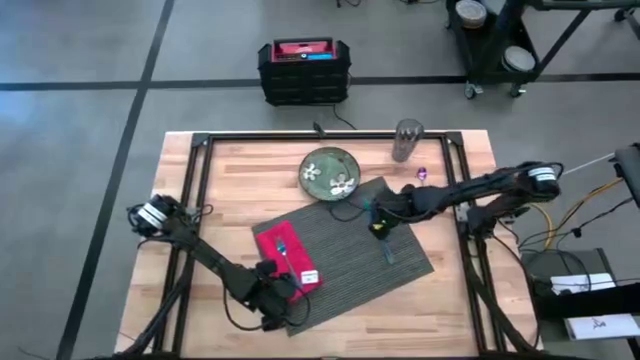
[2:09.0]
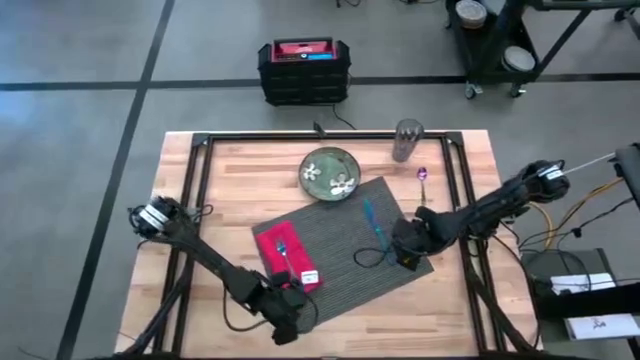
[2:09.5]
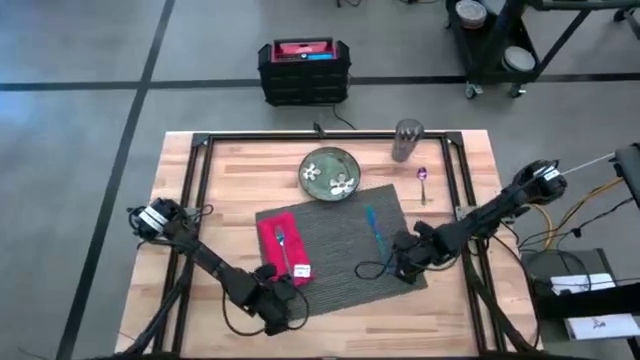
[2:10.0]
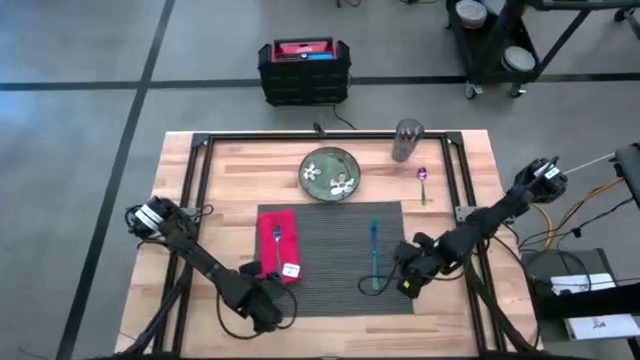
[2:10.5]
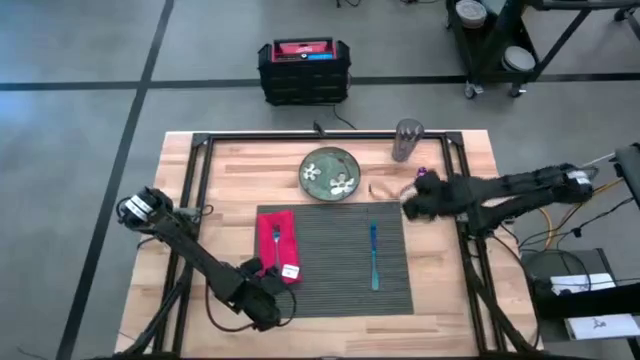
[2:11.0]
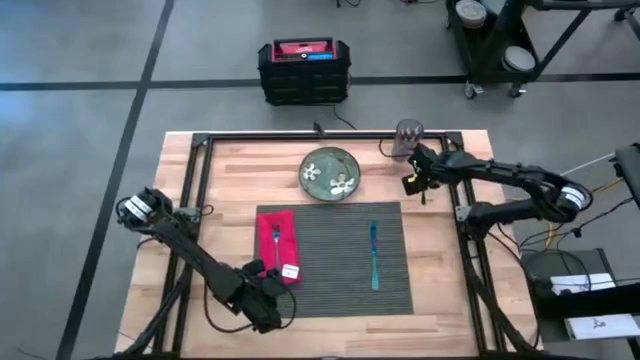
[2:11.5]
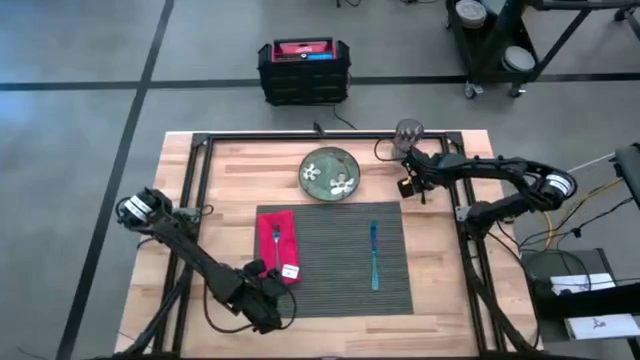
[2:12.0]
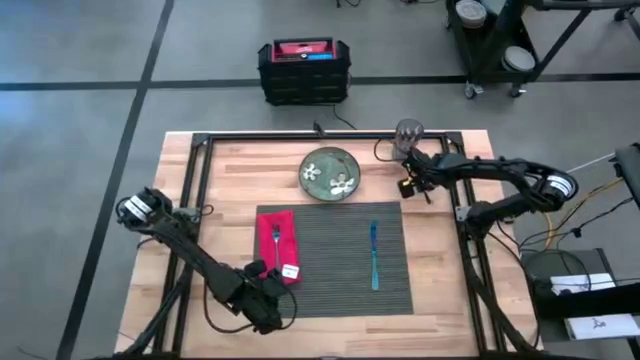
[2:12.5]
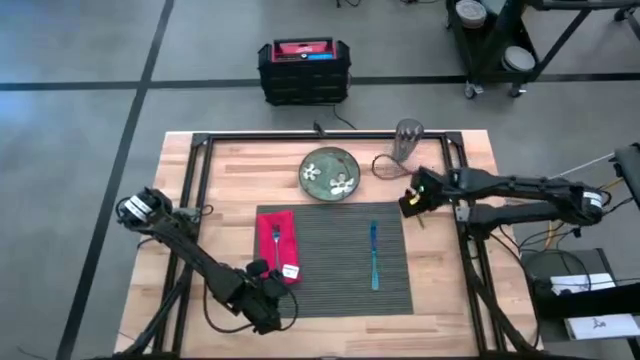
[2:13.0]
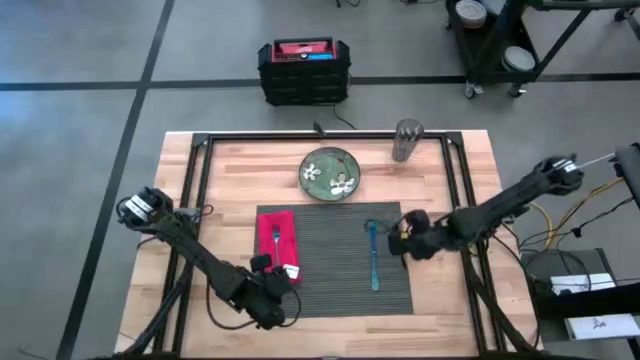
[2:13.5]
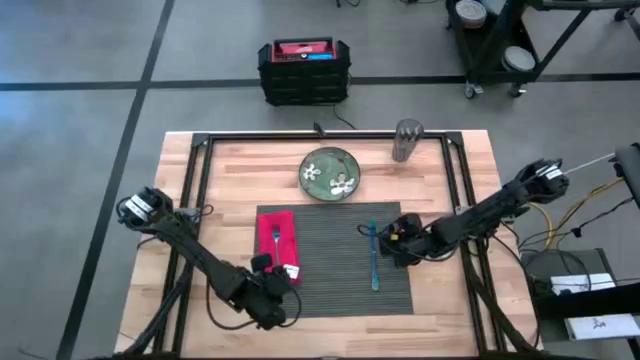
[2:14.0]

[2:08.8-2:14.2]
Task: Set table place
Put the blue spoon on the gray tablemat to the right of the blue table knife

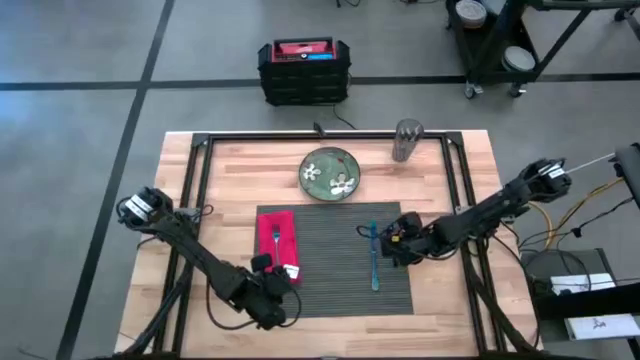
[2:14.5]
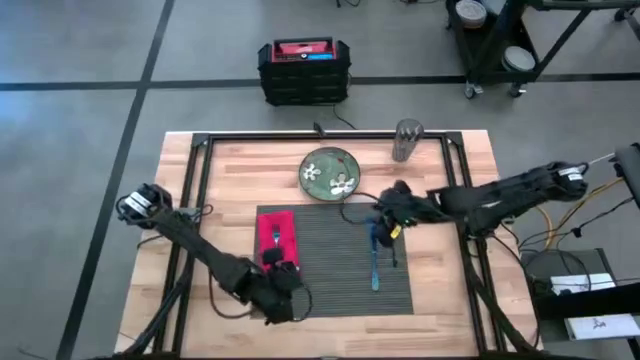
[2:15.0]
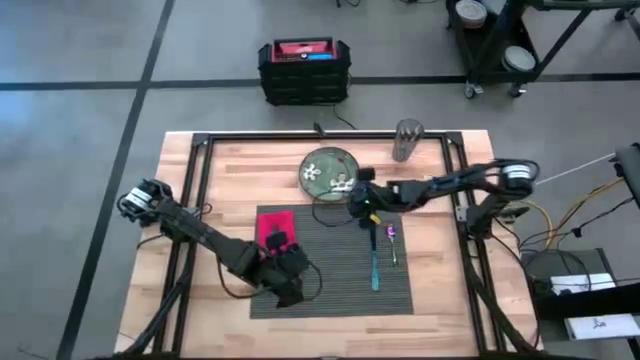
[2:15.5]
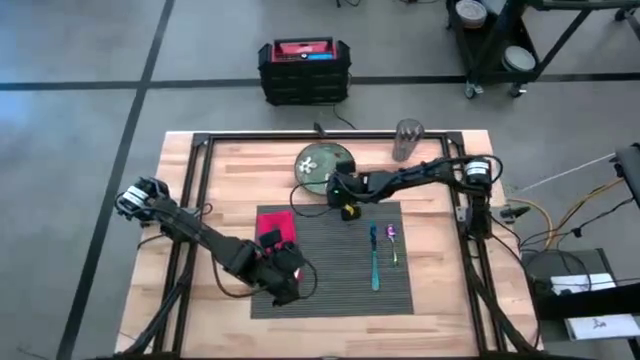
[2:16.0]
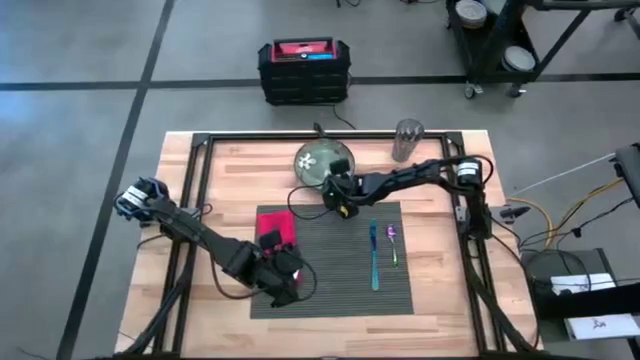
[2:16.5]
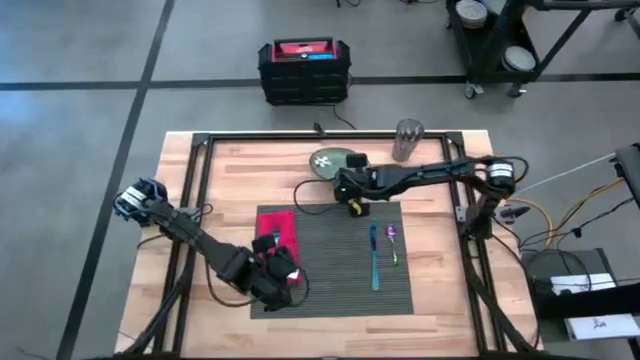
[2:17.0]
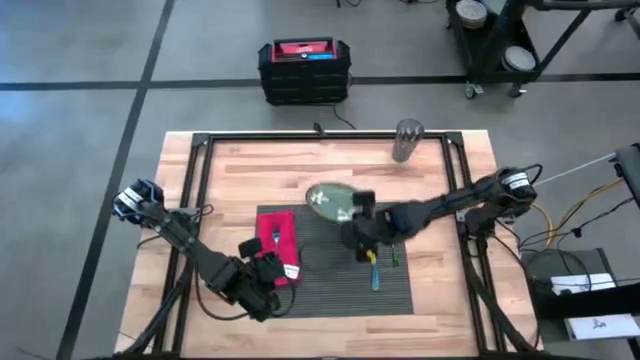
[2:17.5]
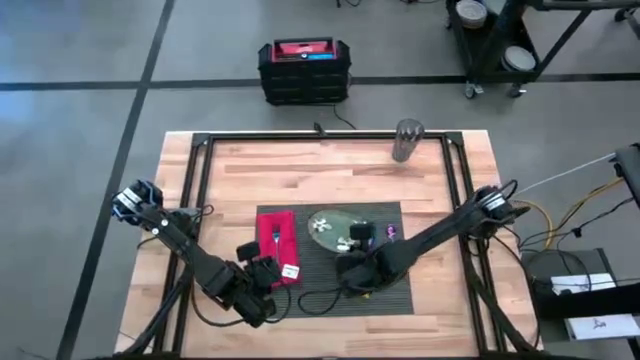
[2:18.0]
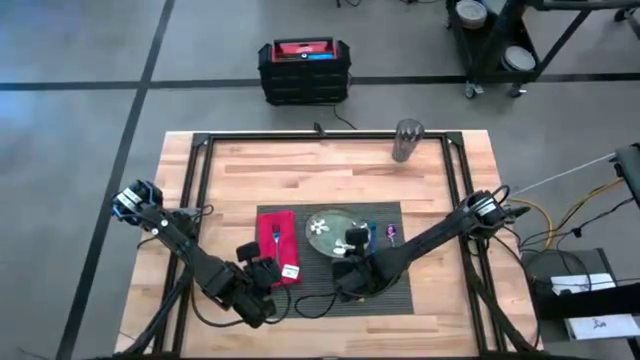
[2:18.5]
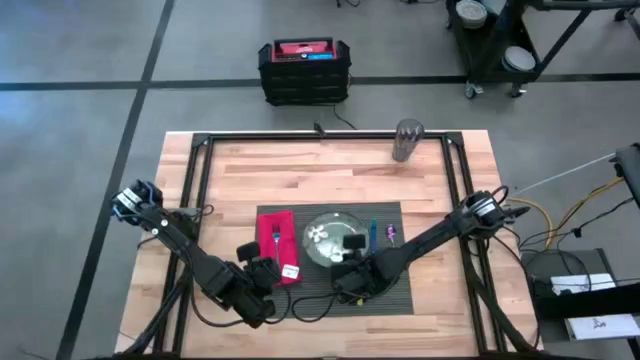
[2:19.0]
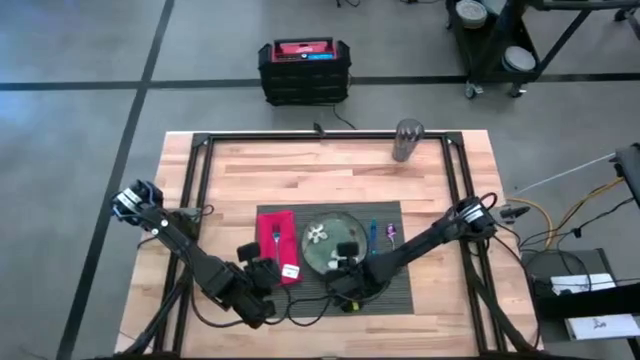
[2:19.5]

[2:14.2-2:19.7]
Put the green plate on the gray tablemat to the right of the red table napkin

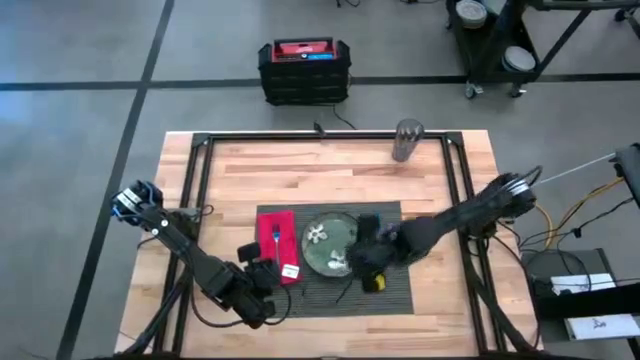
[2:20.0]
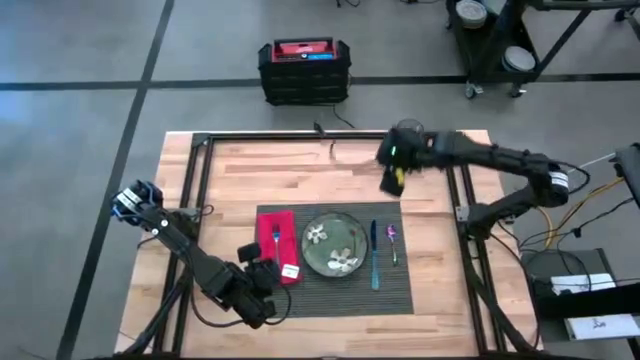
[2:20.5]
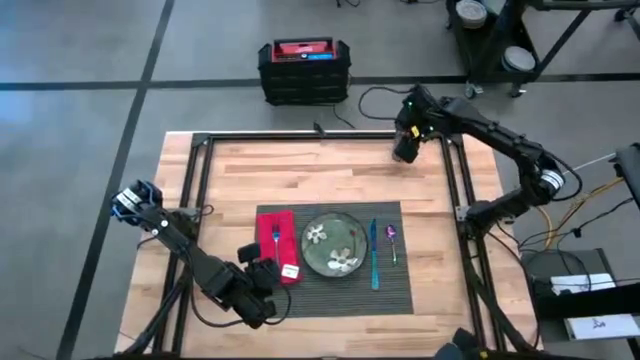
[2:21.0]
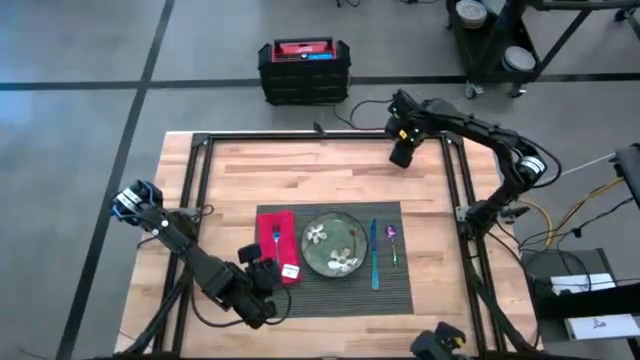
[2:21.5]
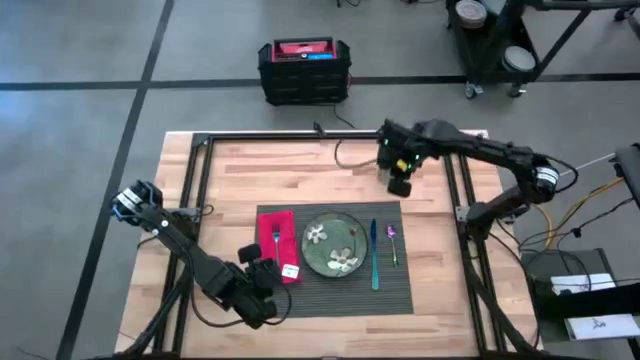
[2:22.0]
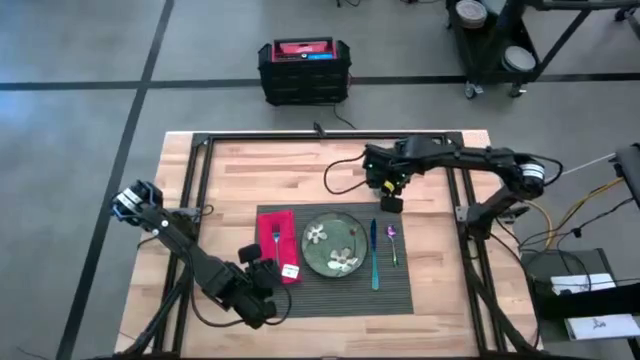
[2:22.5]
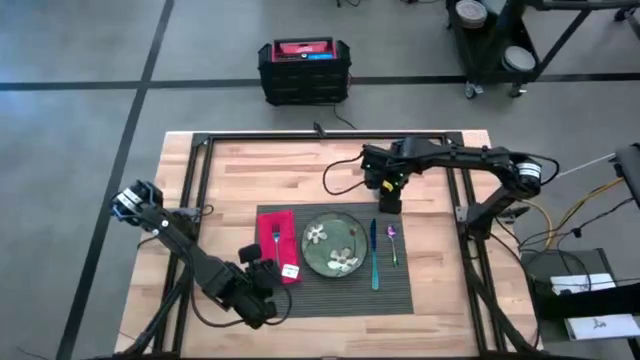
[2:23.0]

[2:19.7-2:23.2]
Move the blue cup to the top right of the gray tablemat

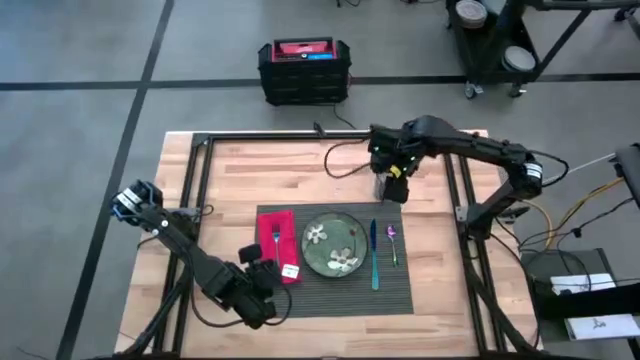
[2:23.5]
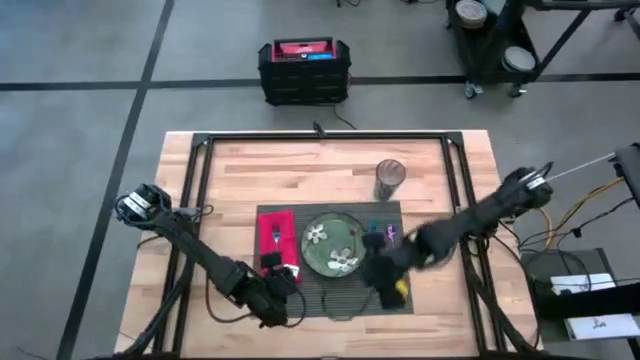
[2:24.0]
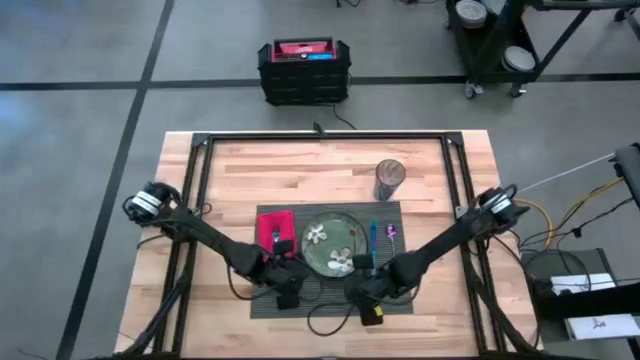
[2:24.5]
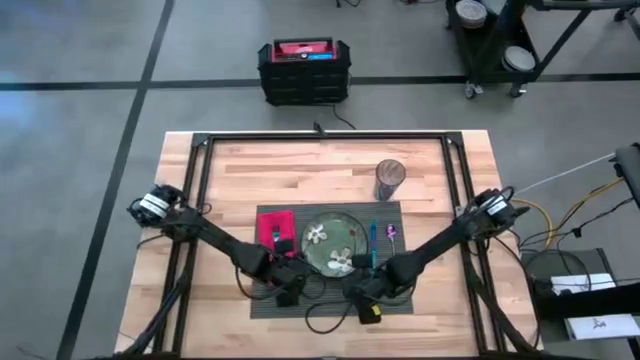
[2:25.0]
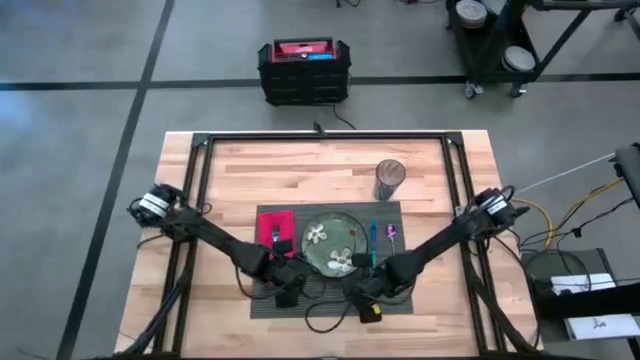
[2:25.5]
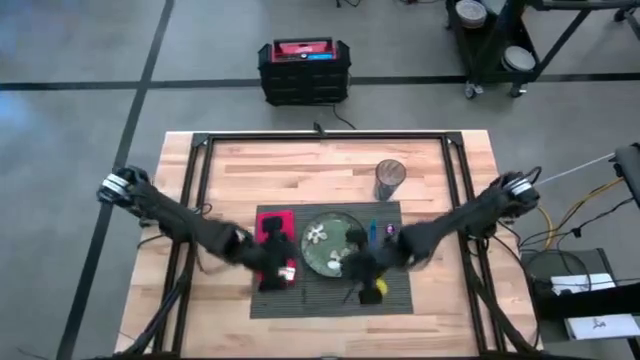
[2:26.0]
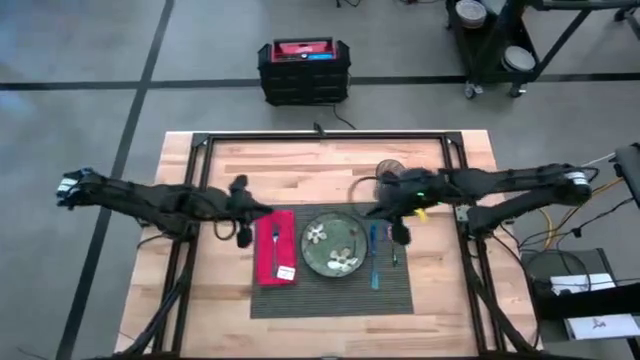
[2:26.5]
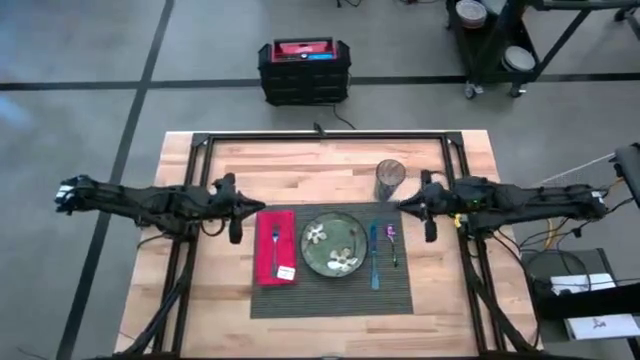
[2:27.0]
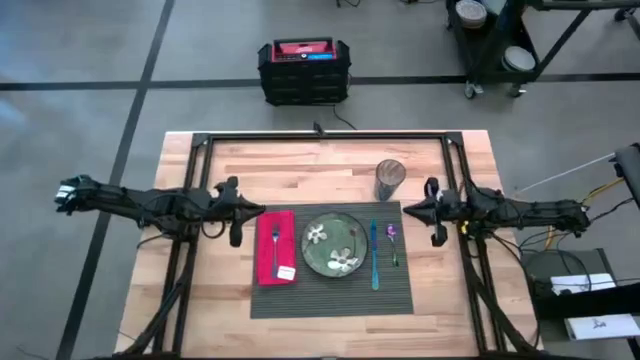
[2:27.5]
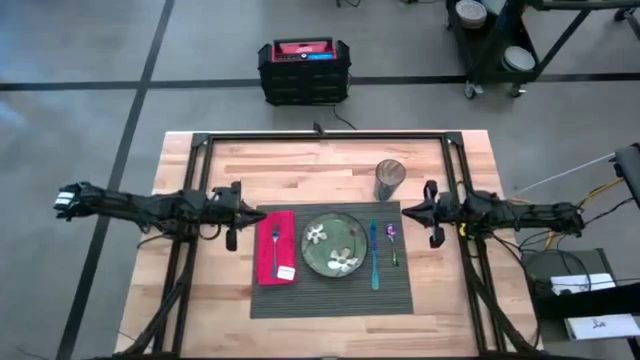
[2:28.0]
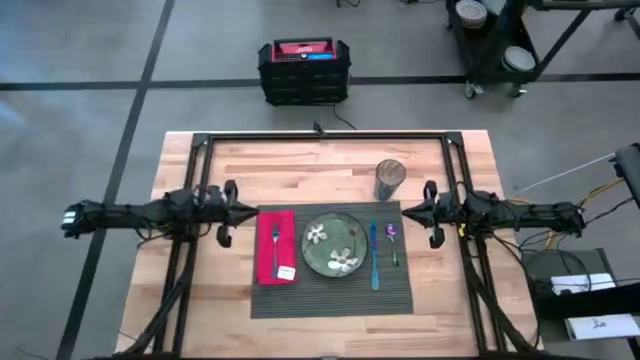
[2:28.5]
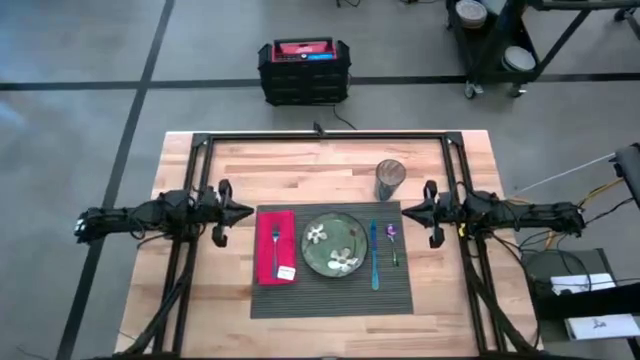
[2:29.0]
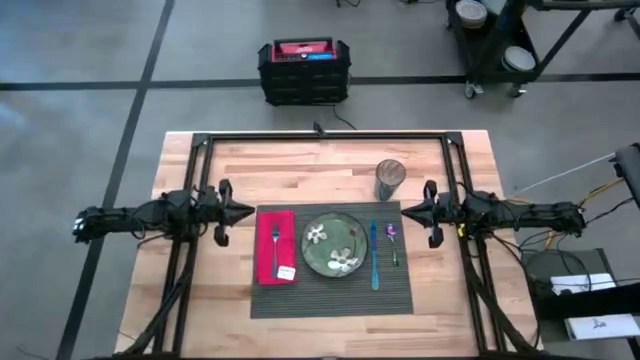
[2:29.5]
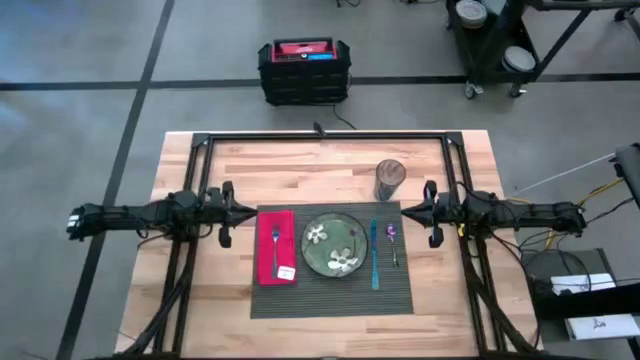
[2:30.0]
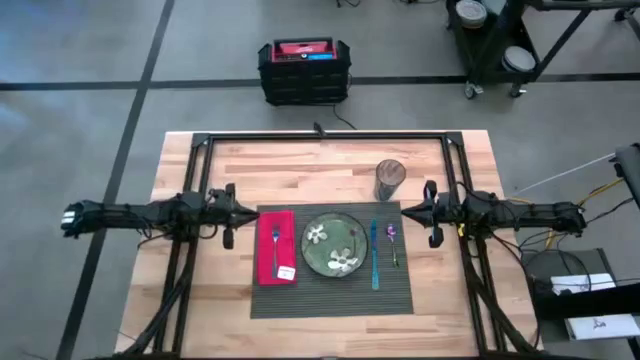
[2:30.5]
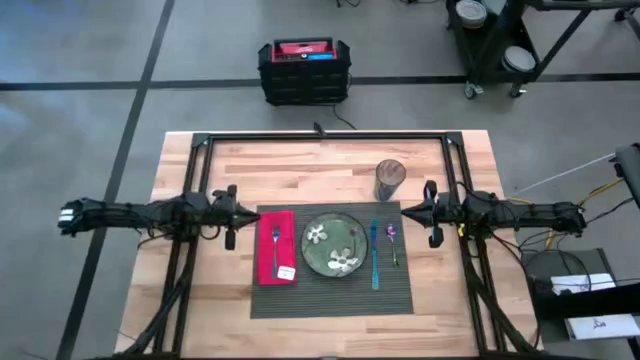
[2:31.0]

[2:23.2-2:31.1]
Return to Home Position
